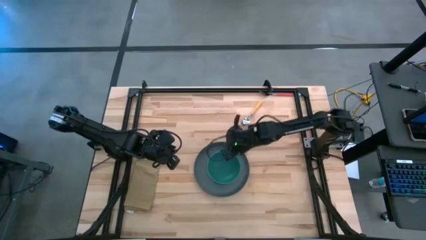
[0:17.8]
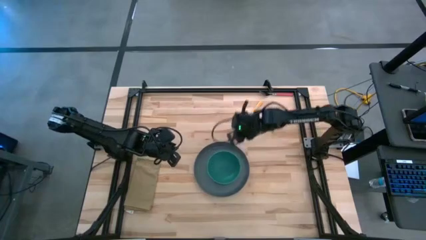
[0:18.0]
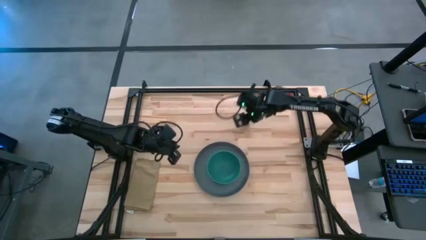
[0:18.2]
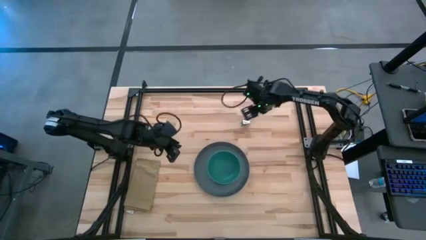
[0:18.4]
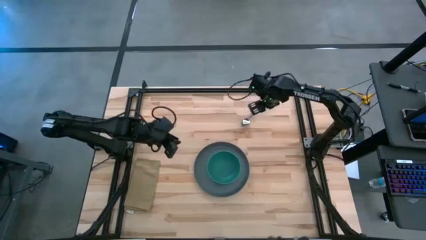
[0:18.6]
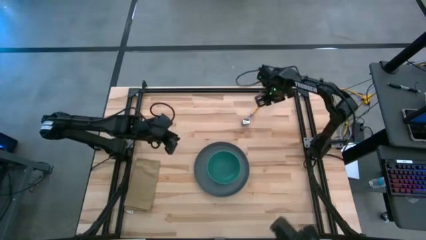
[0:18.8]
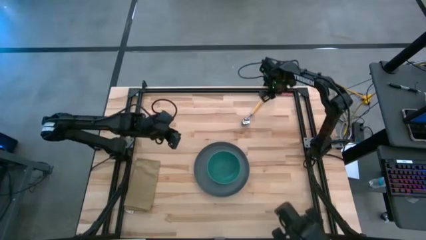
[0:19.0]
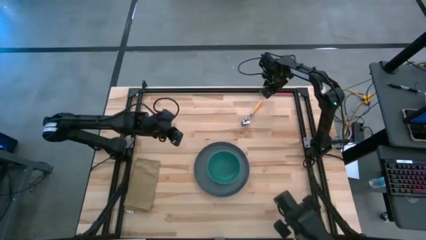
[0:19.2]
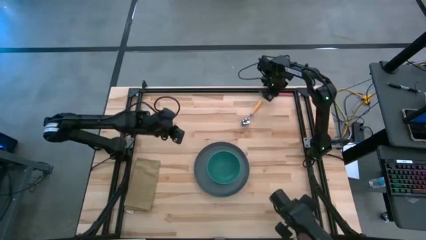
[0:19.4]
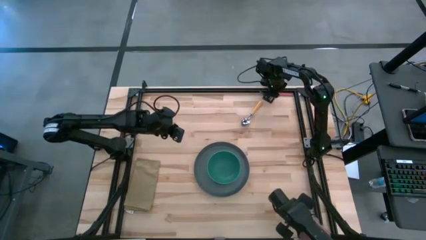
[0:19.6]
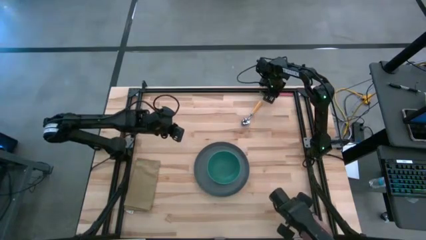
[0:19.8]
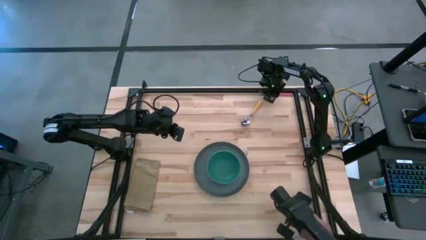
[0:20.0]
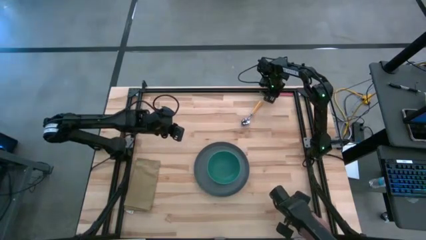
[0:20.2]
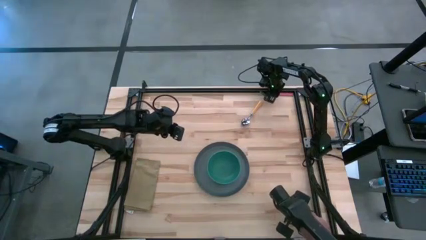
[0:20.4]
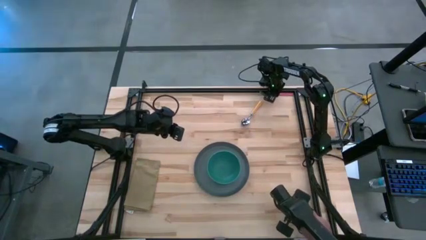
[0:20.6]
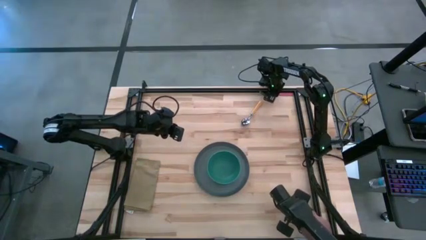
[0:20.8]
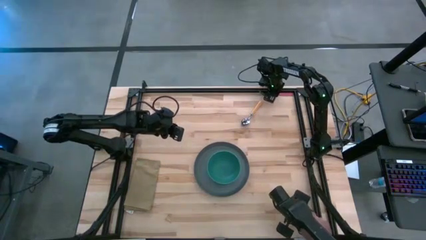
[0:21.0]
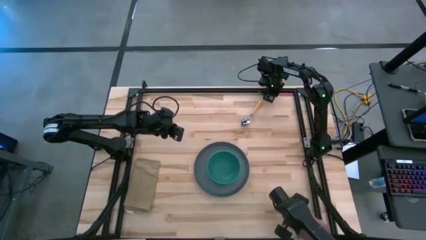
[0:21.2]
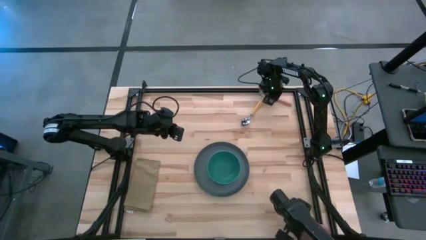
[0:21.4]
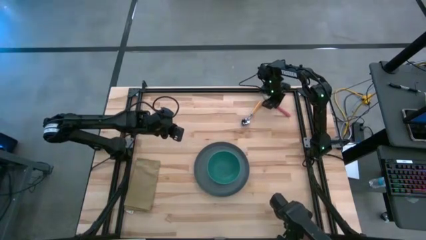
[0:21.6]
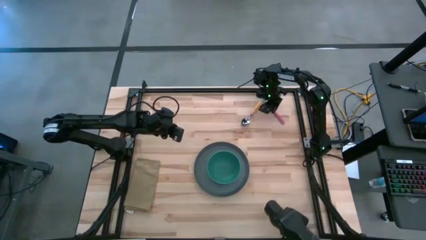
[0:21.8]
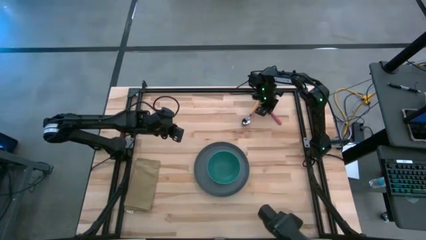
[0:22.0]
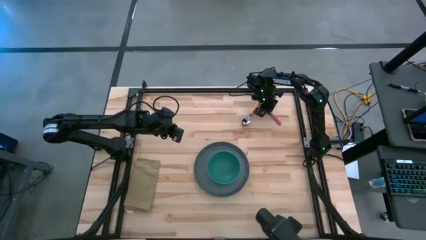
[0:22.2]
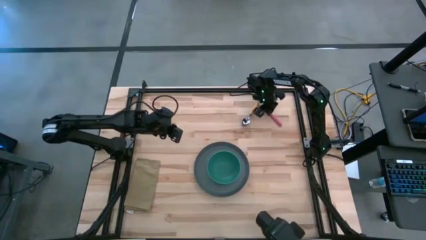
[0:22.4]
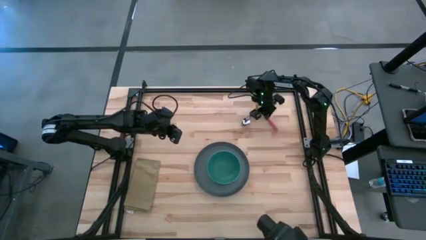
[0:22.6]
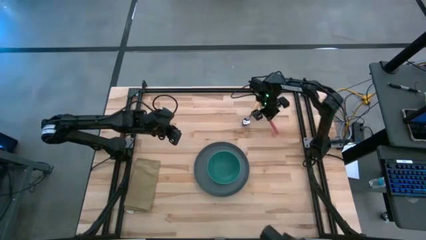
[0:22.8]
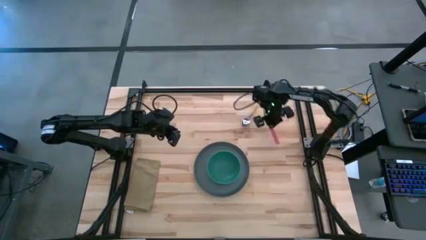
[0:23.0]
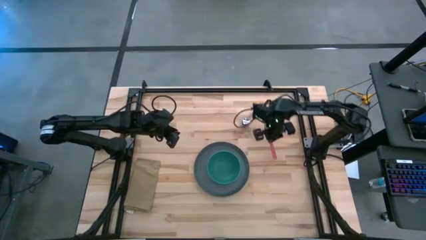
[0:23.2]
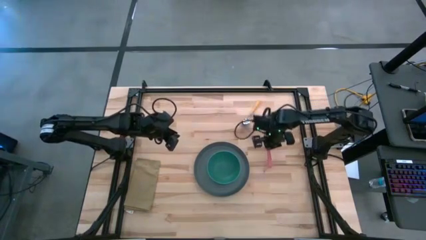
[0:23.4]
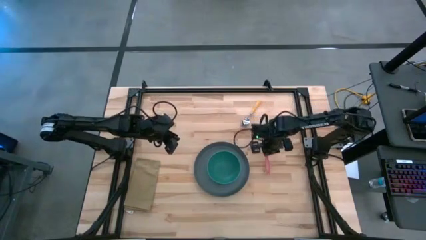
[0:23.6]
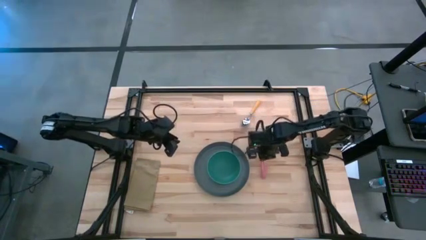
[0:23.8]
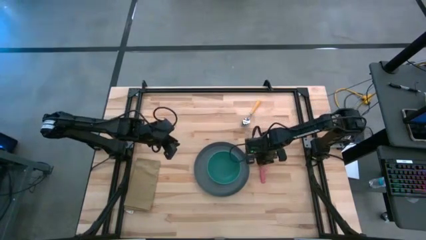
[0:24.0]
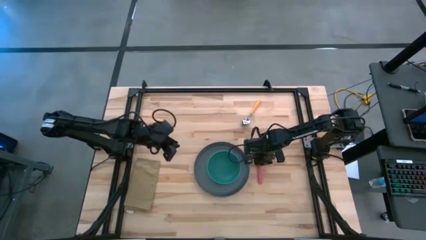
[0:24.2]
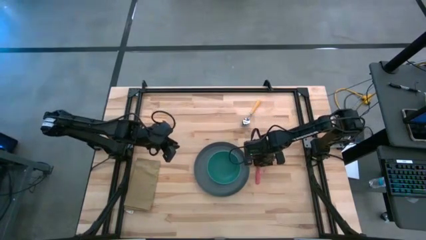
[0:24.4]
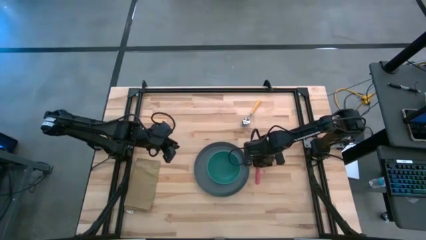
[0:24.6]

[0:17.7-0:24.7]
Task: Set table place
Put the pink fork on the table to the right of the gray plate

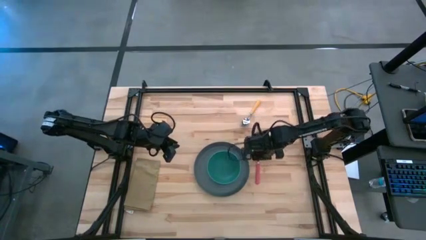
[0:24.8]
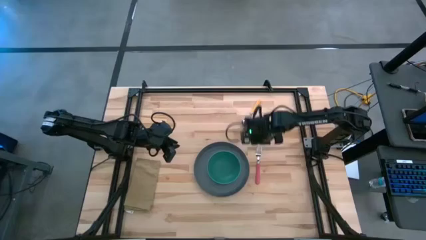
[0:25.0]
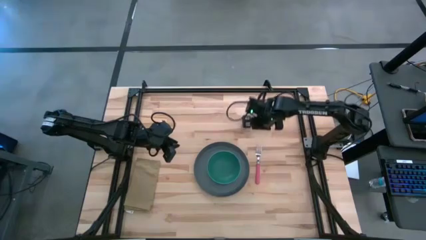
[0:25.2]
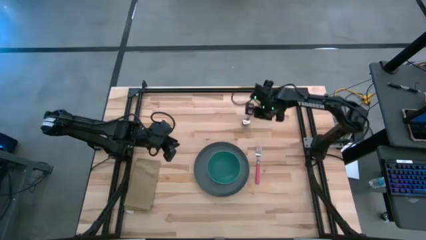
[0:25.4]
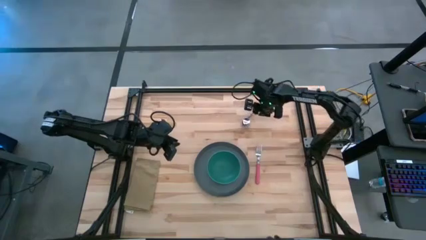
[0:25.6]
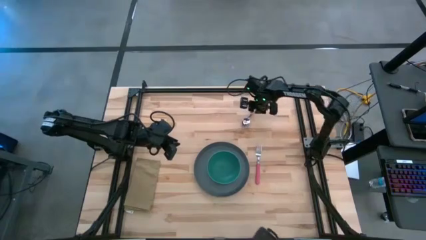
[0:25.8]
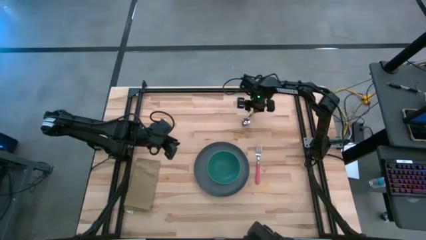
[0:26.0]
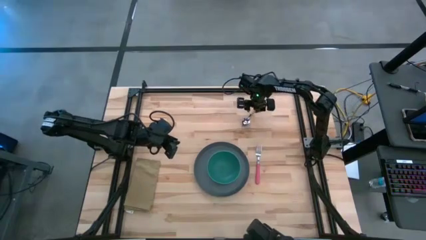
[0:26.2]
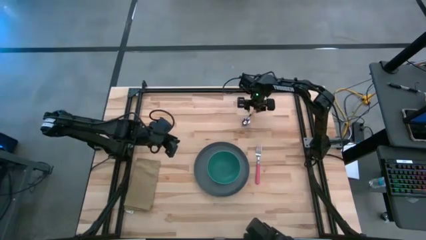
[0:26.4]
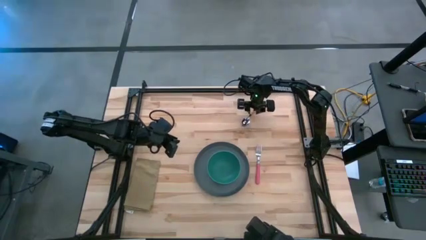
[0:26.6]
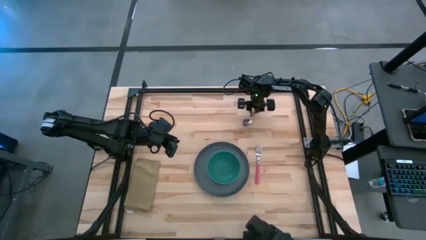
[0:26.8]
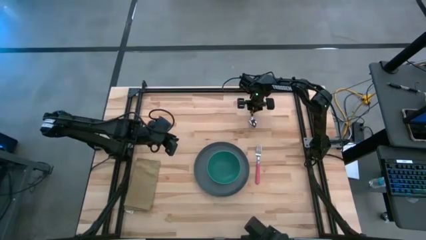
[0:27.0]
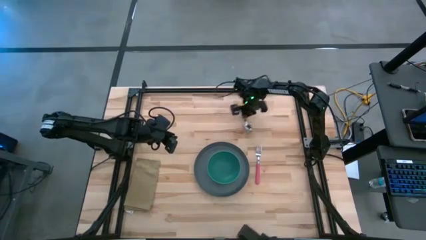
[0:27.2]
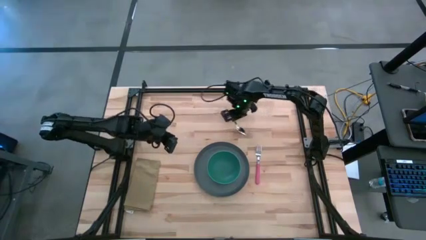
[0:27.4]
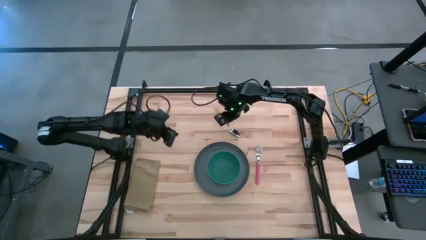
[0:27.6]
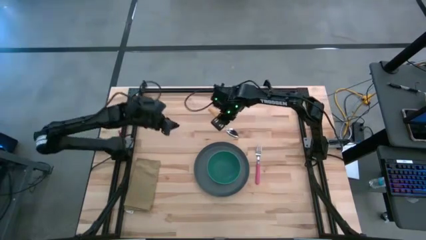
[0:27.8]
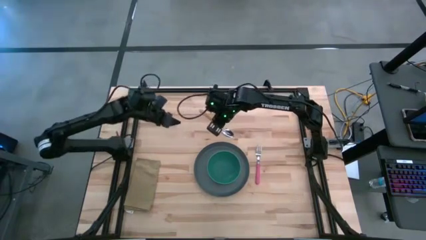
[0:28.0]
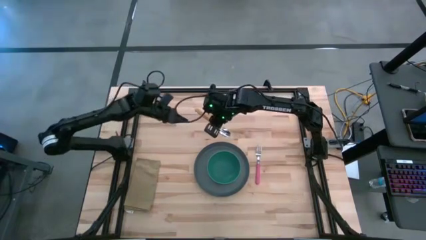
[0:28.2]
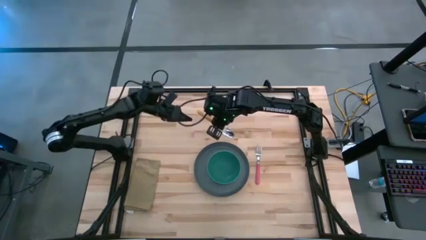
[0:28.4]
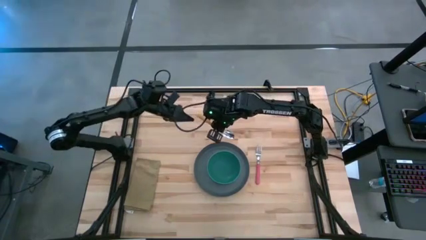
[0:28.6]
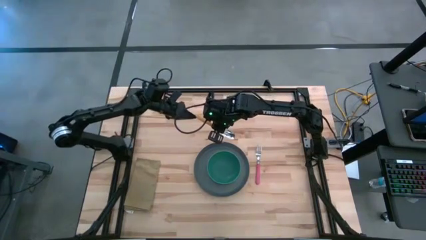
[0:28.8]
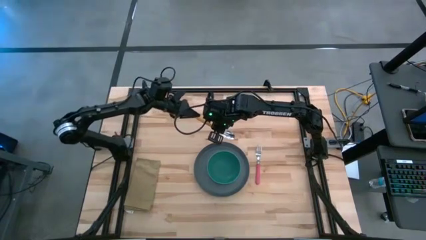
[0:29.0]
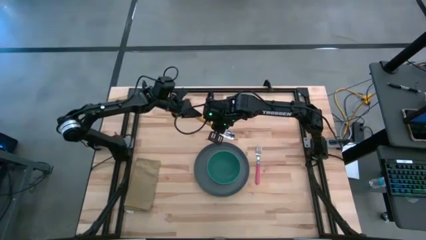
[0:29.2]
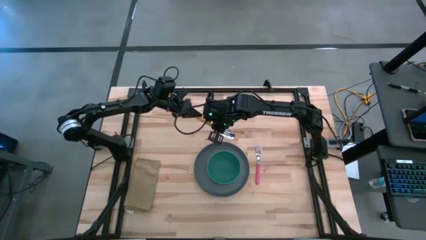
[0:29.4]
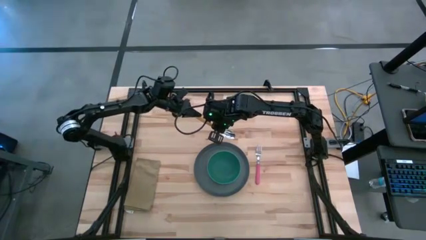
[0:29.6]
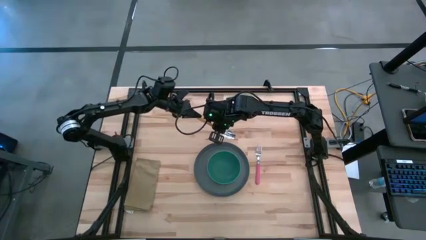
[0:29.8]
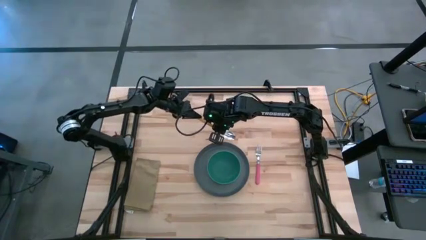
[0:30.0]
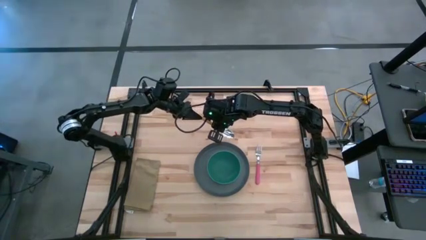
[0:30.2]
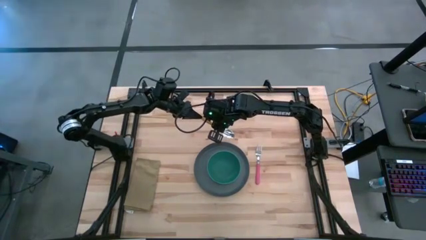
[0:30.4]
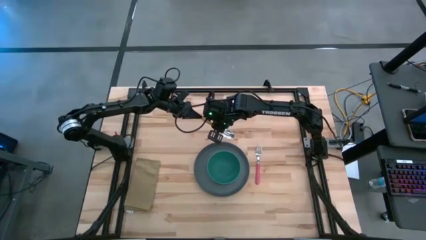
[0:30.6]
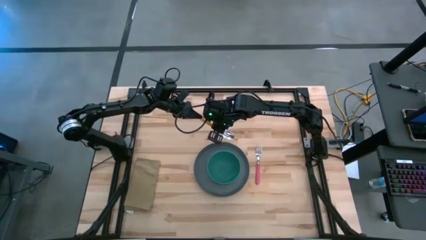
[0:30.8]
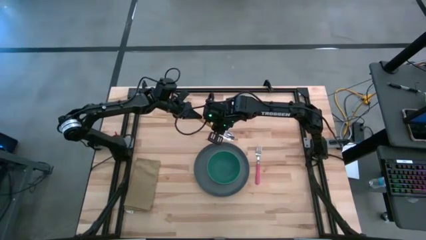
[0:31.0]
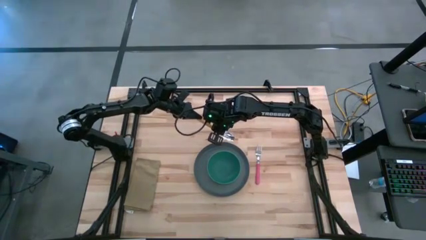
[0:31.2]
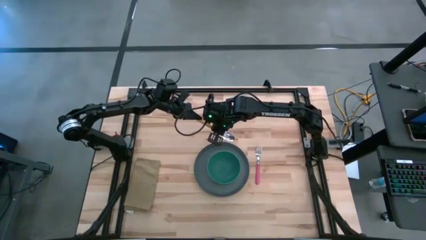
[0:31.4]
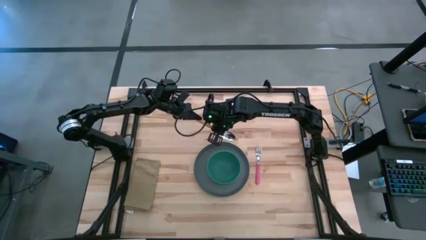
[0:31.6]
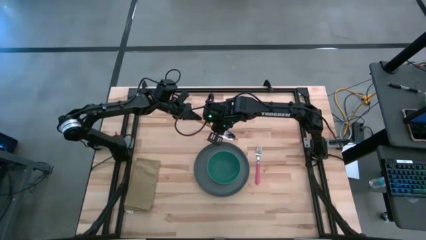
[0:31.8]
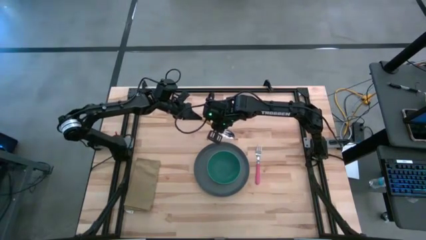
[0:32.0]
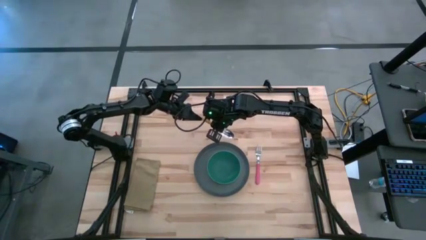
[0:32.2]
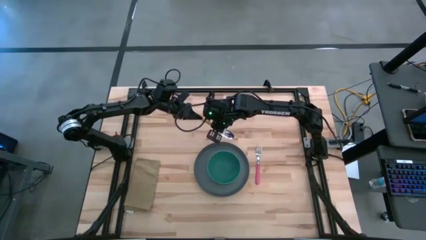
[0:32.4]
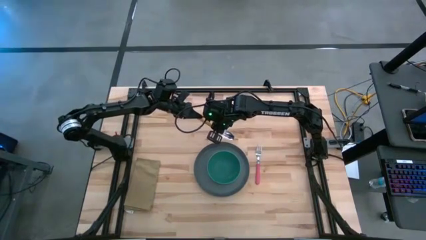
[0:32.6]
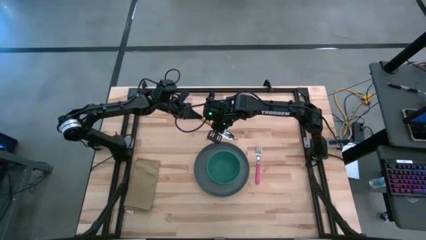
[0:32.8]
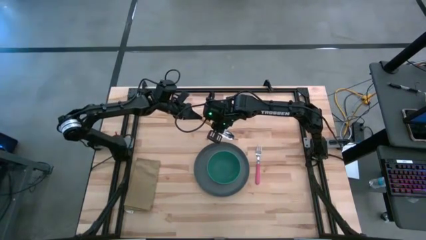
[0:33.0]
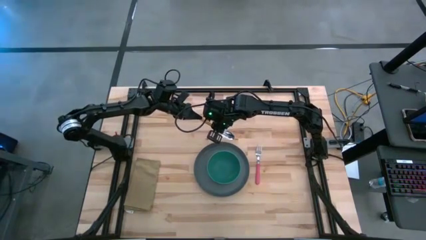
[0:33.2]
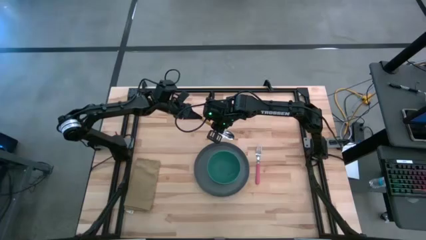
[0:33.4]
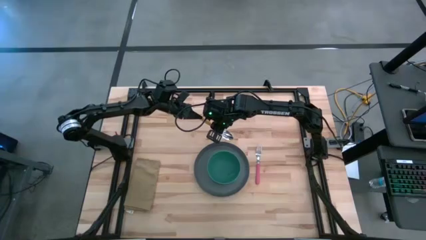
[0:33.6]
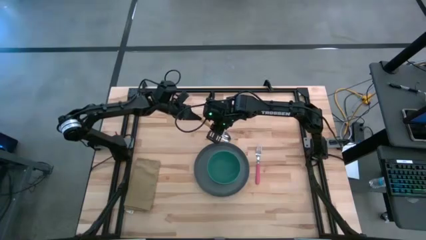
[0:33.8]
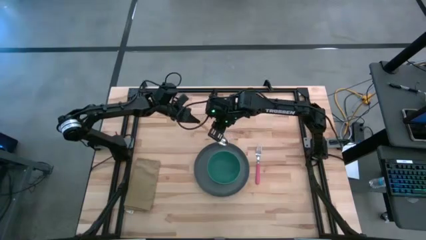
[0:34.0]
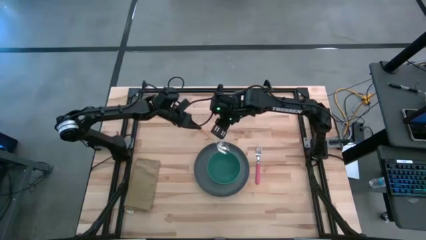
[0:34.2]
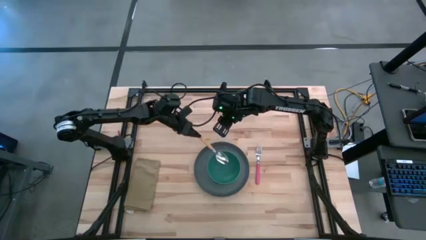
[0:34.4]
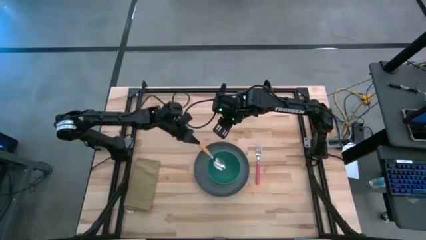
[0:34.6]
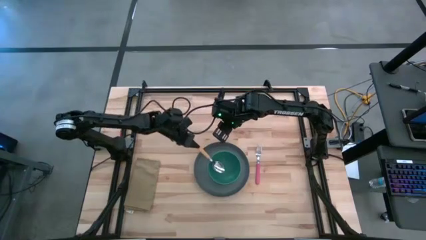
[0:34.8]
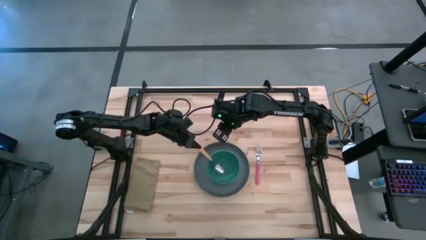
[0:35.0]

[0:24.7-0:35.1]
Put the yellow spoon into the green bowl
